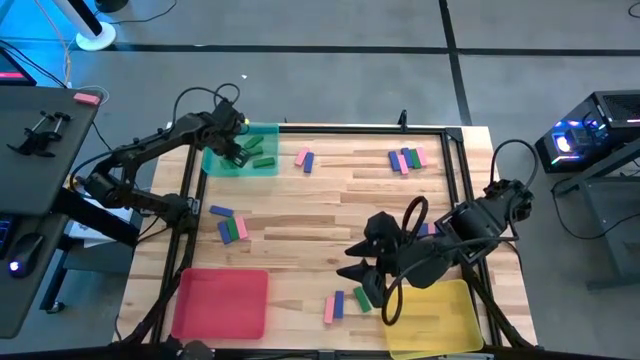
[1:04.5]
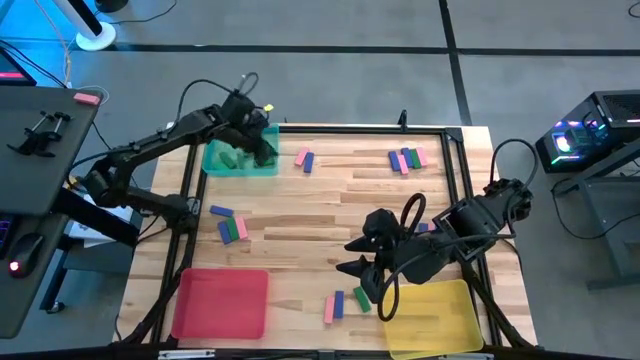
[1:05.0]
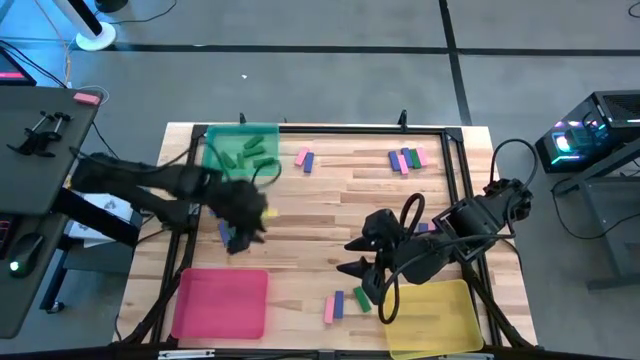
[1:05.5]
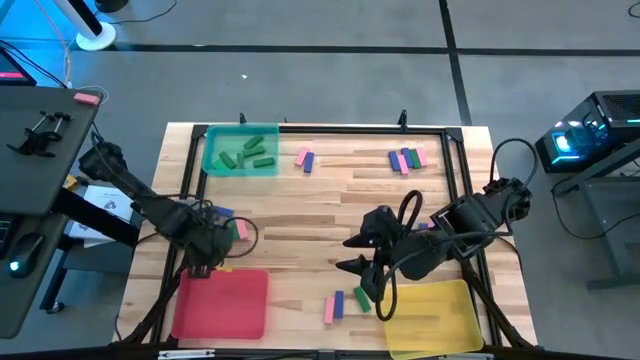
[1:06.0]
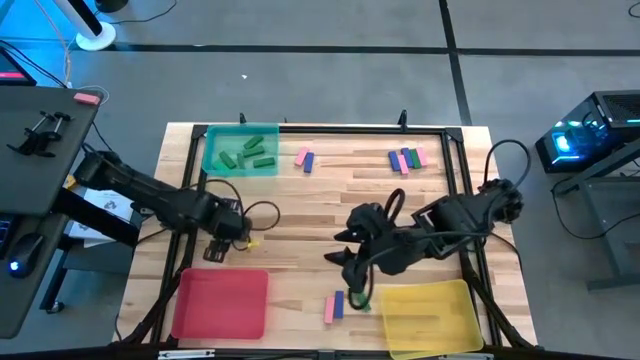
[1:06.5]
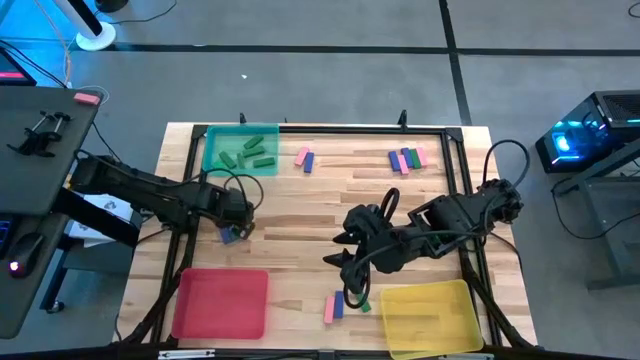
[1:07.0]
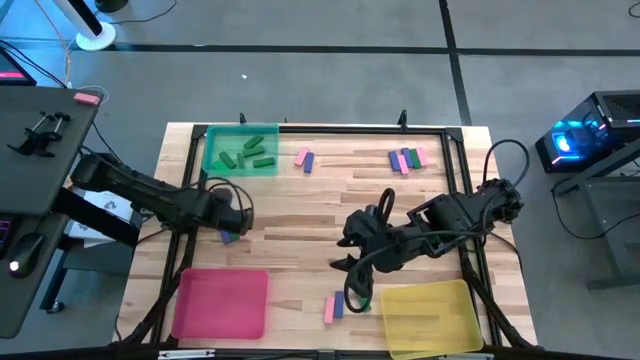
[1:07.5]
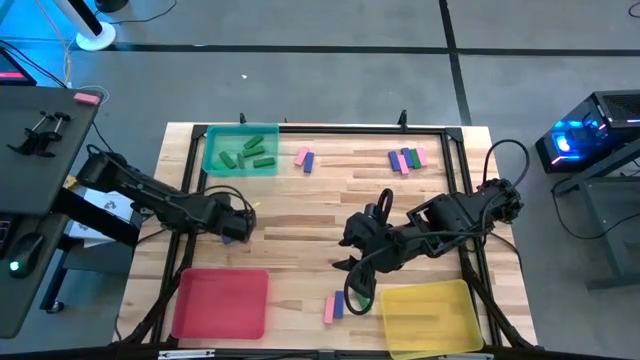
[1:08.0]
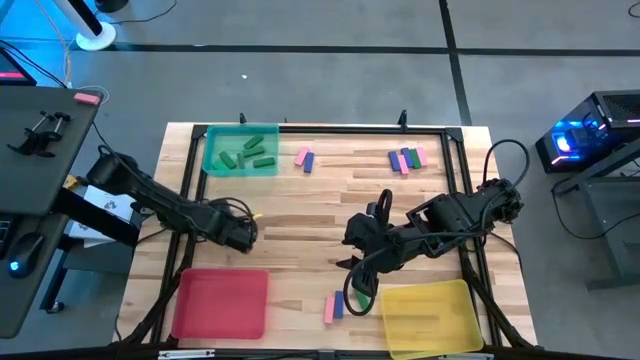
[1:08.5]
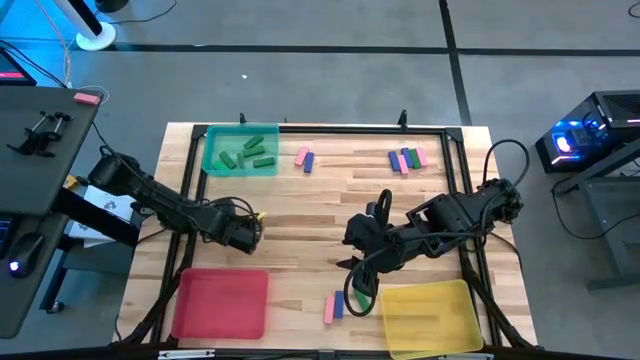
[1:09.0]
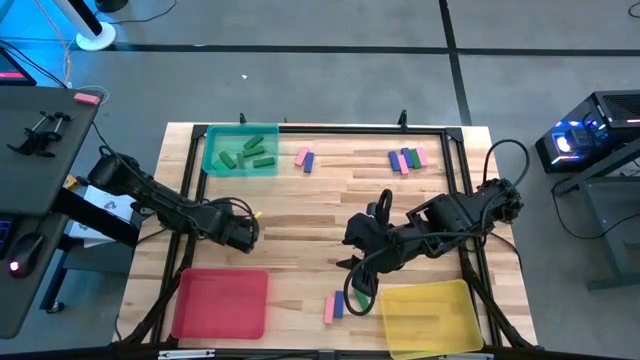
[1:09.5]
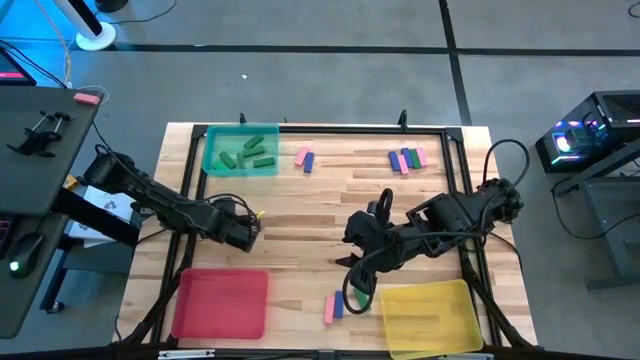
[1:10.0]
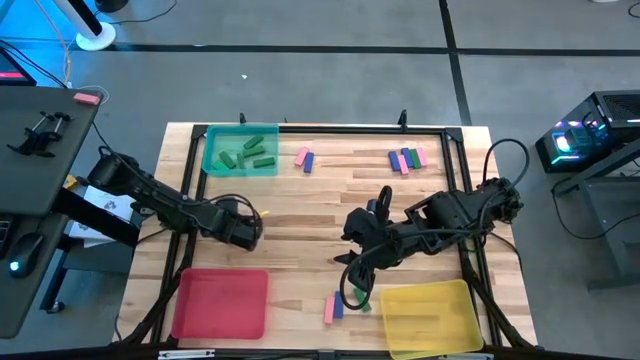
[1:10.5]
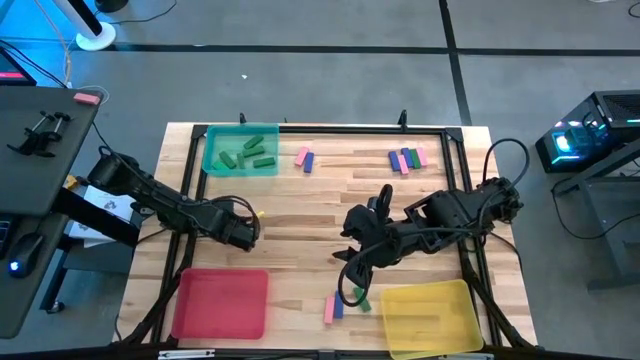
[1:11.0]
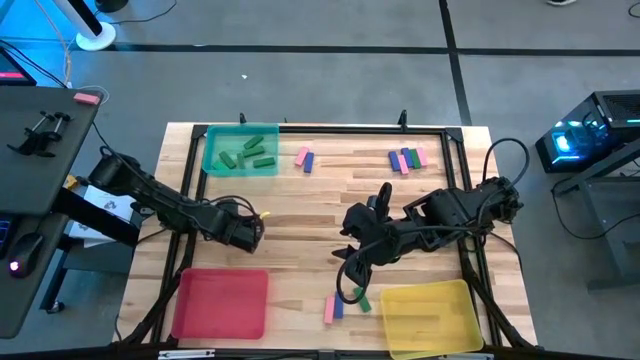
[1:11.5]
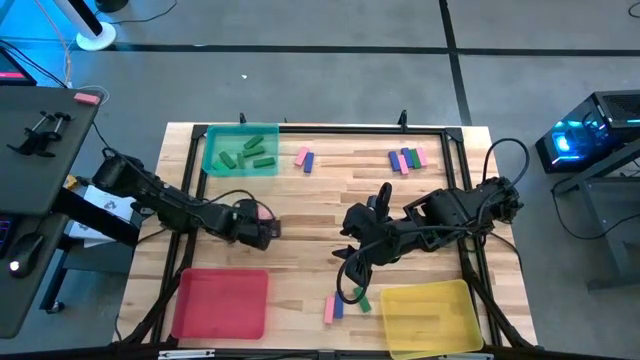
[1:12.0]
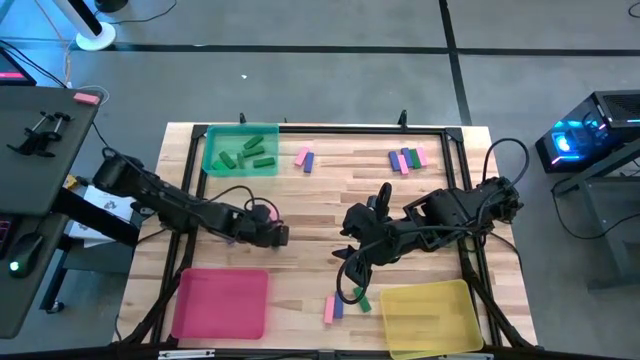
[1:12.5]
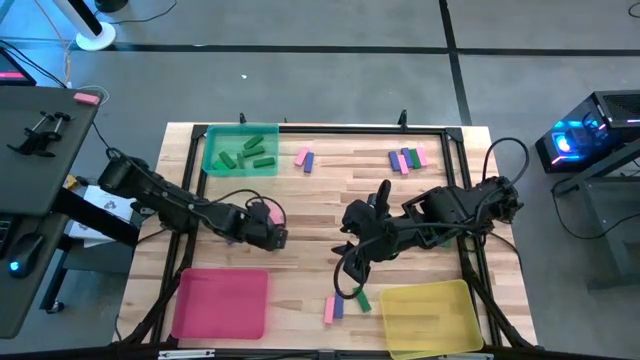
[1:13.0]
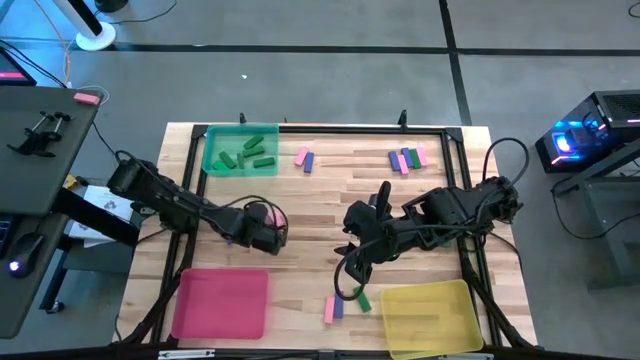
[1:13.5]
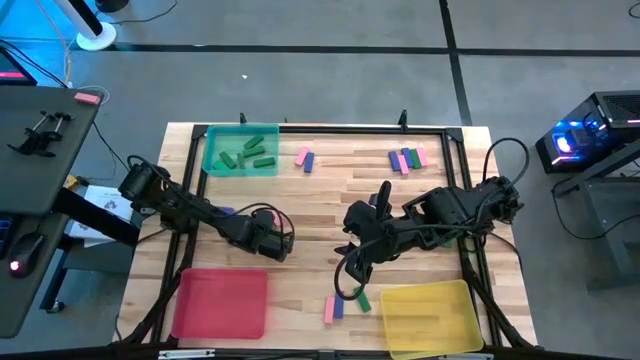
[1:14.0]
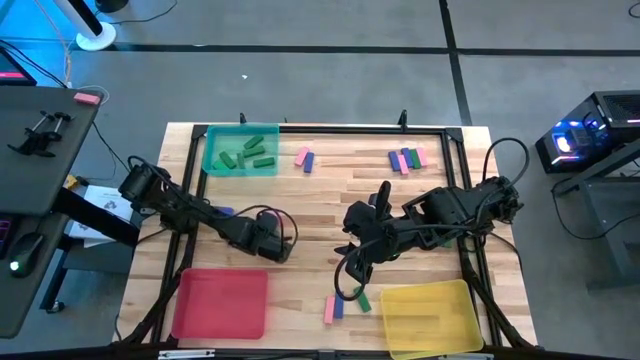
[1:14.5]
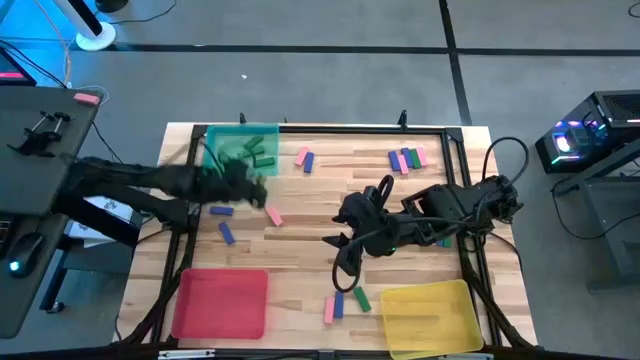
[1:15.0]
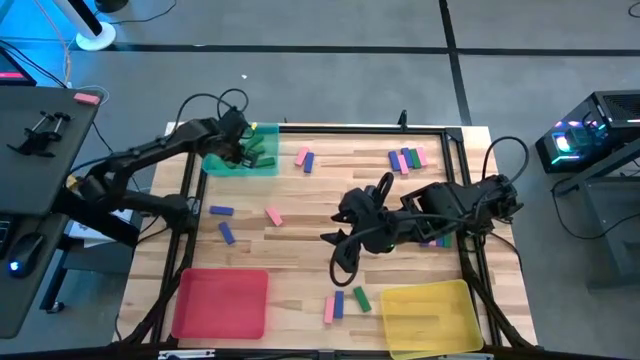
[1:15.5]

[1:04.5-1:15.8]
Task: Sort blocks
Put the green block into the blue bin

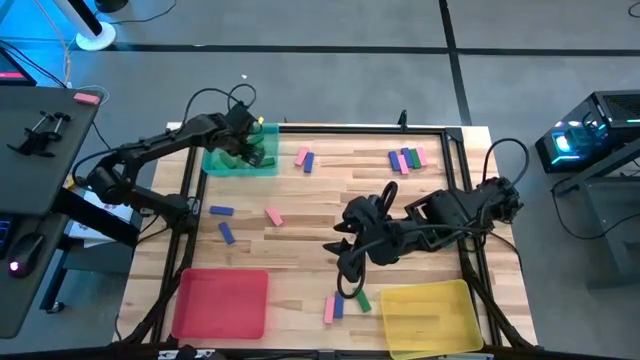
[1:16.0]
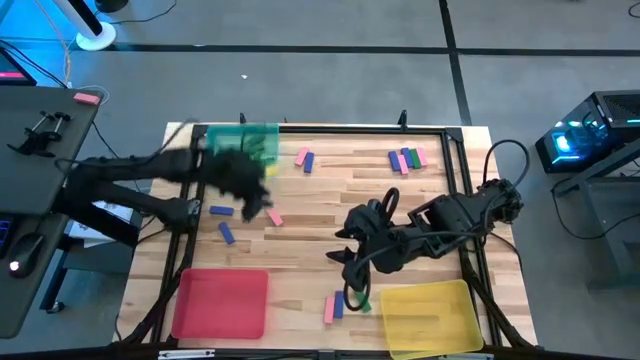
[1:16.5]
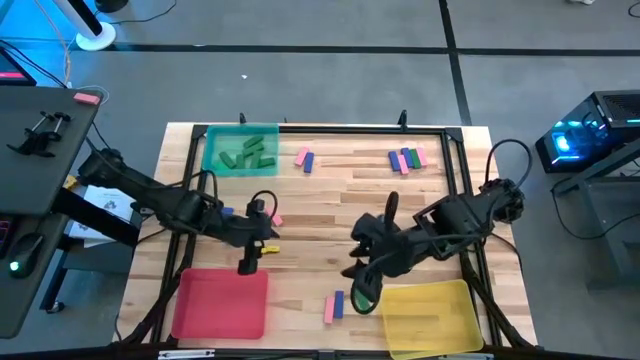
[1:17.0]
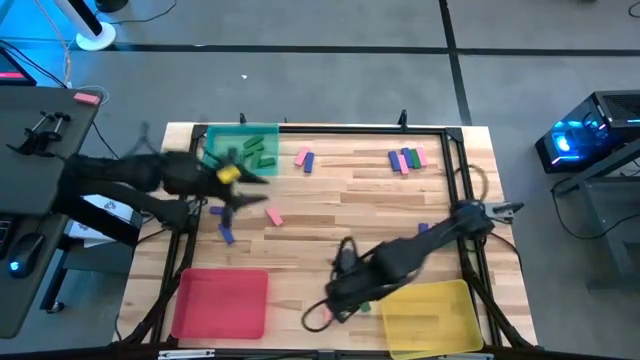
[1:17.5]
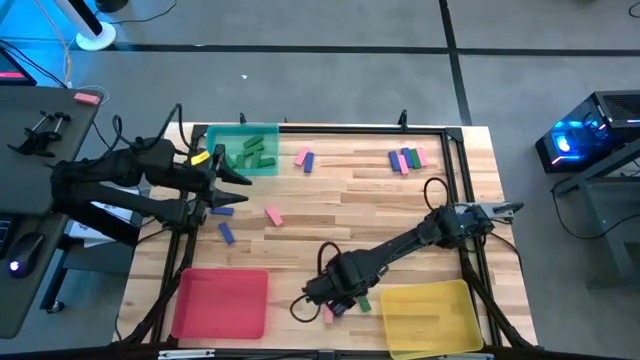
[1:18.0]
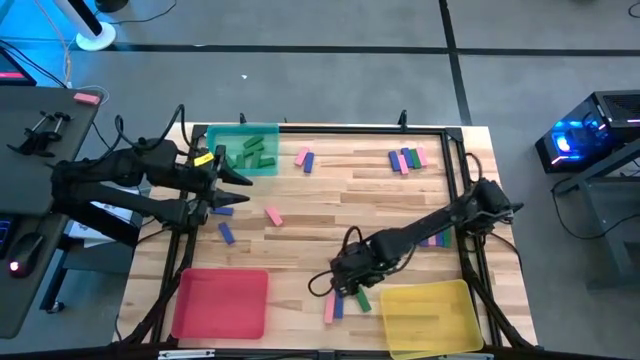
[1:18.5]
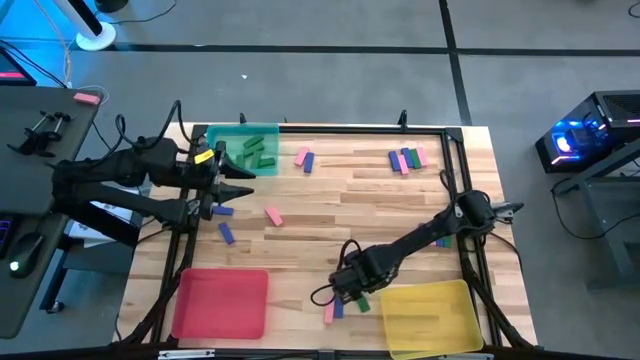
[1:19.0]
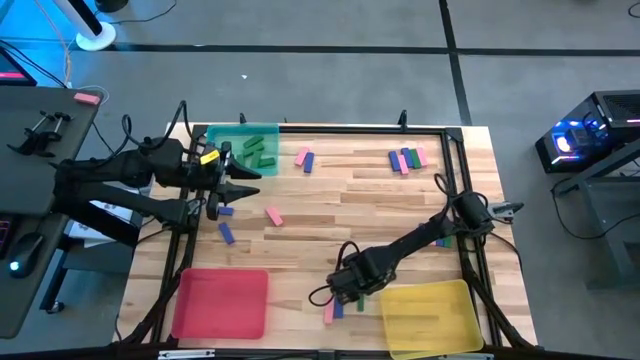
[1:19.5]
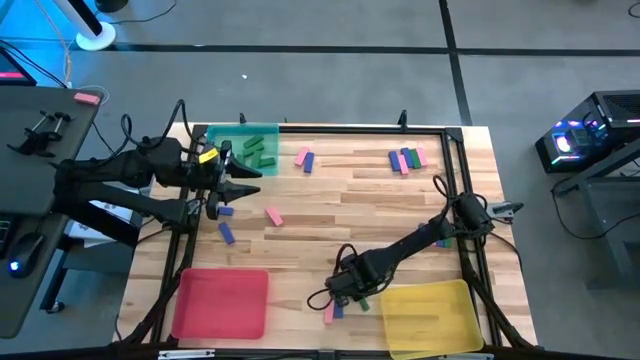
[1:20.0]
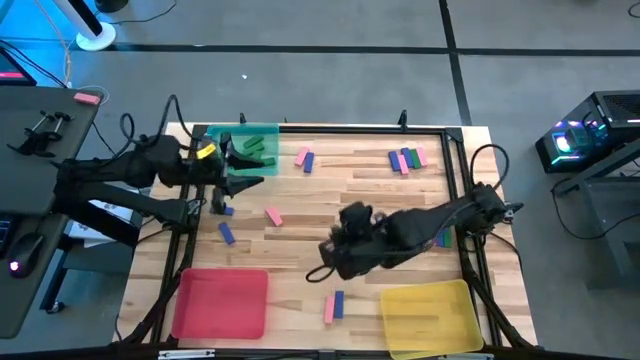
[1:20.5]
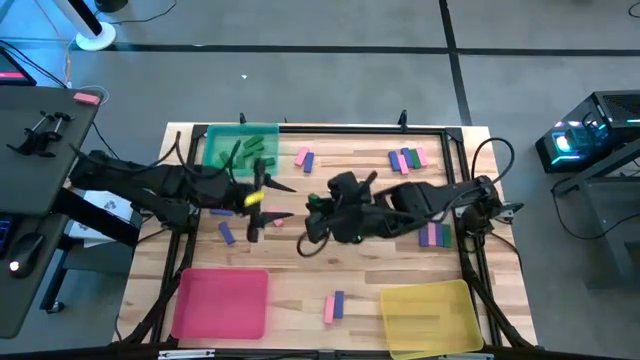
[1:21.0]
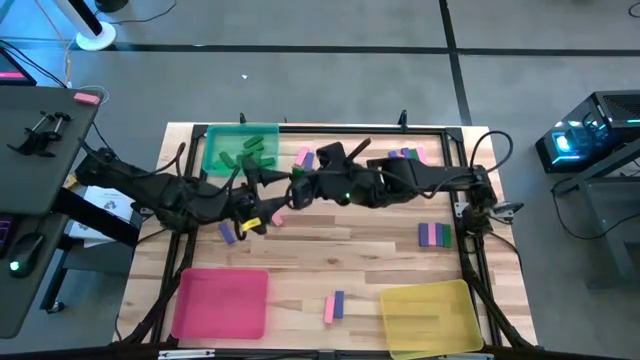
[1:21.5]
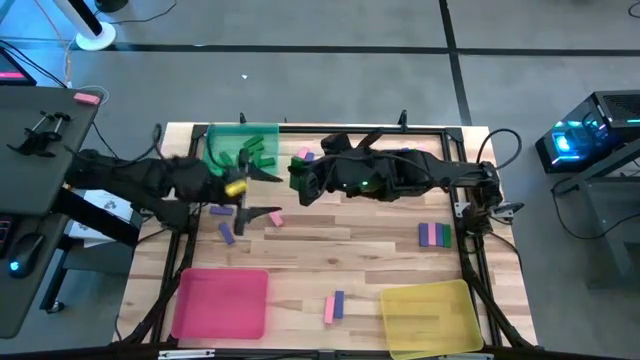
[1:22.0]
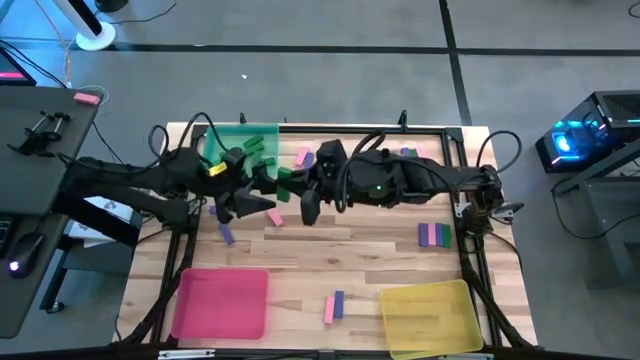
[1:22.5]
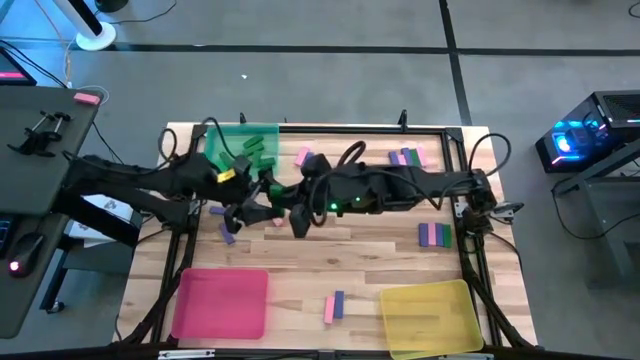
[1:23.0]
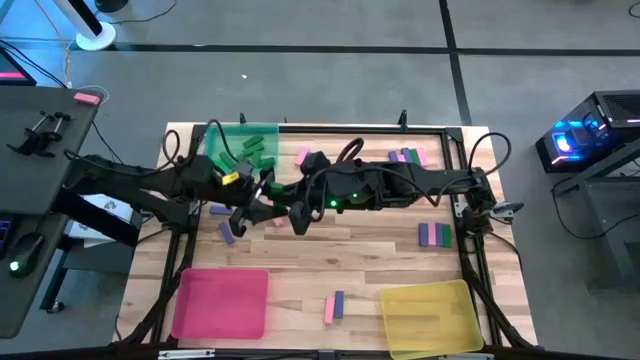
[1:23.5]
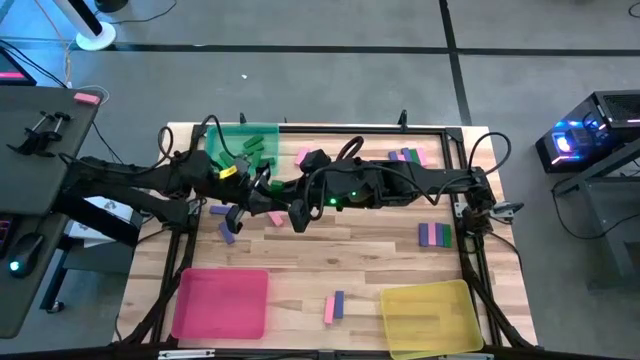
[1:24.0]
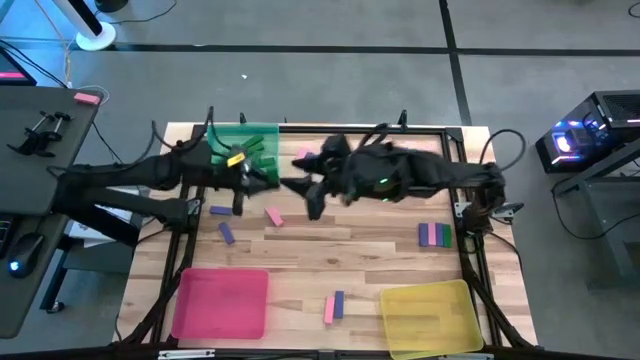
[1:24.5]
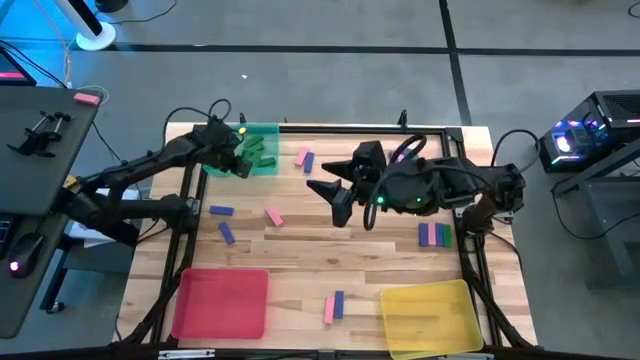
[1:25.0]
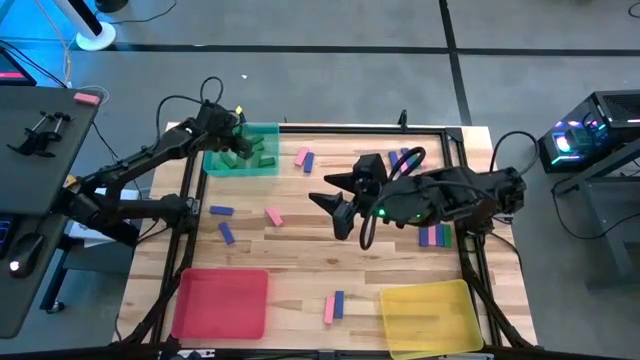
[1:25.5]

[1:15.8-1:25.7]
Put the green block into the blue bin
